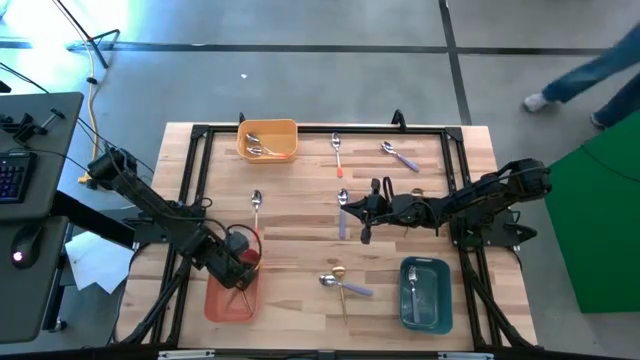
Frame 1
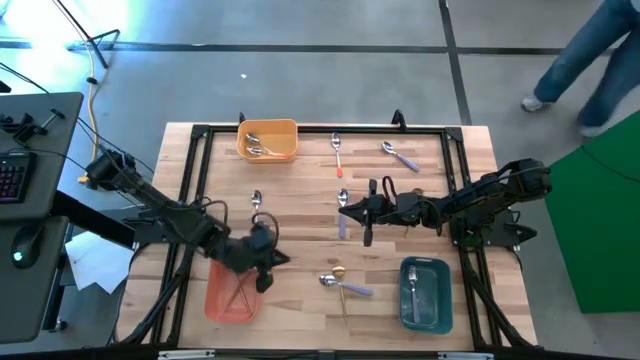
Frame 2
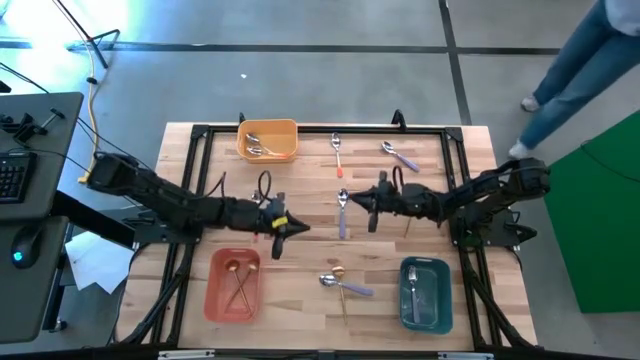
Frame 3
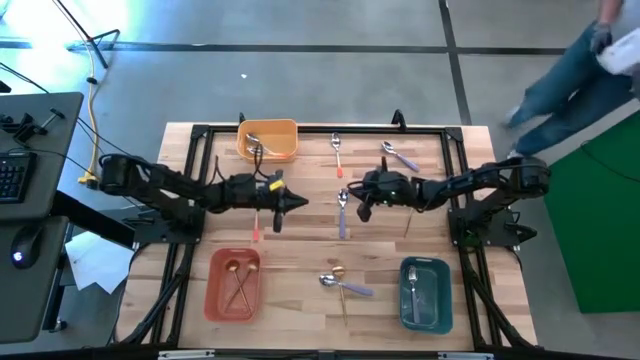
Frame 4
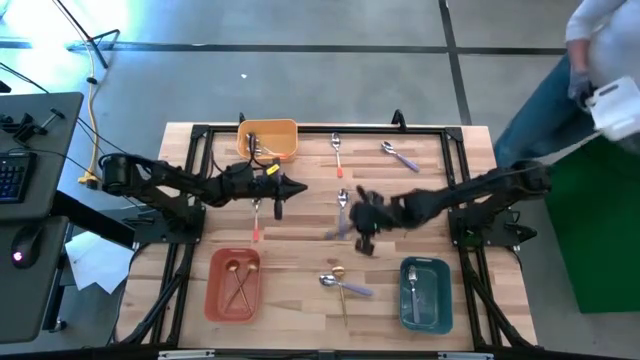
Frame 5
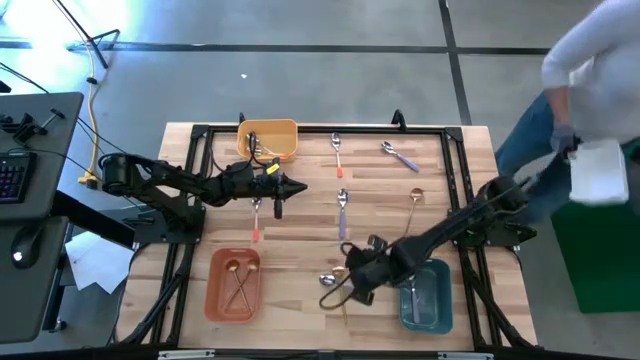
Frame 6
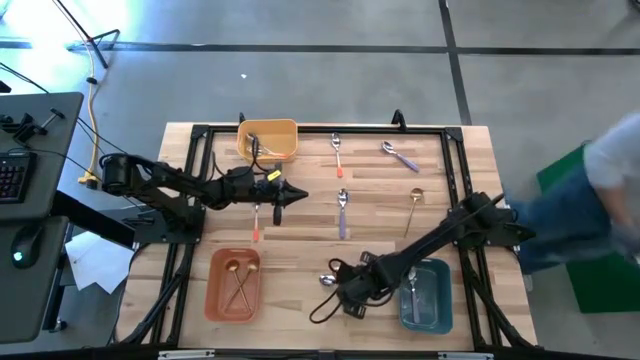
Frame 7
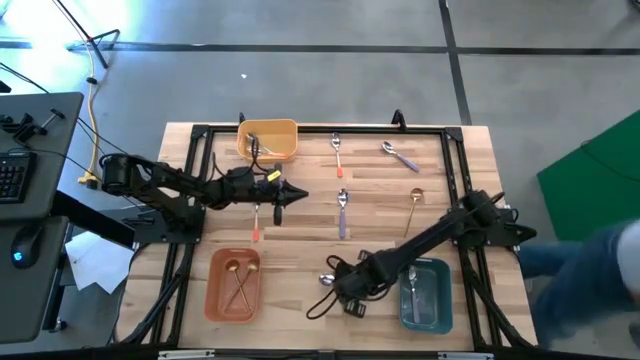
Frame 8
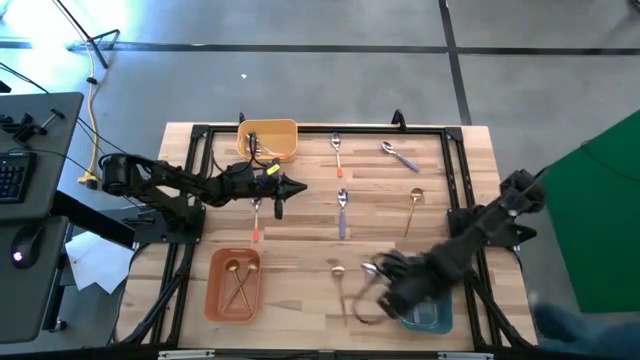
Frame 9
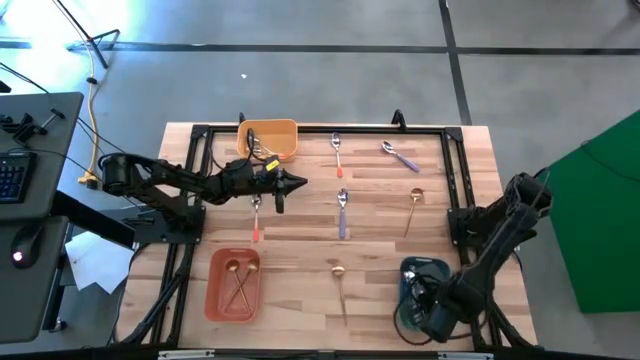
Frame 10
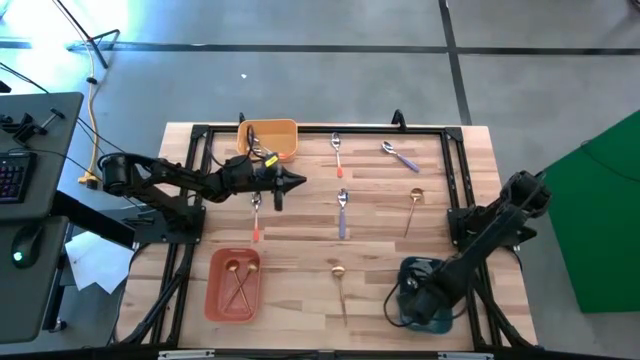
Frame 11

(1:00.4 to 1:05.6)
Task: Sort silverware by color (type)
Put the bottom left violet spoon into the blue bin

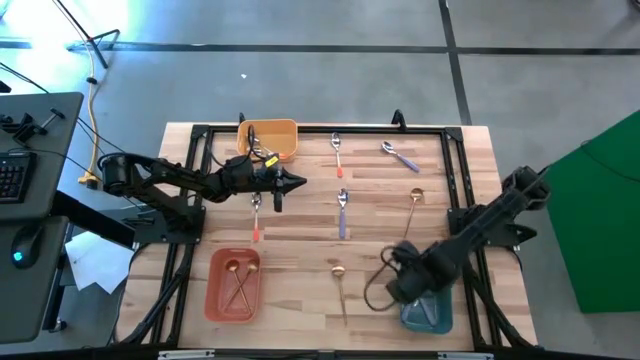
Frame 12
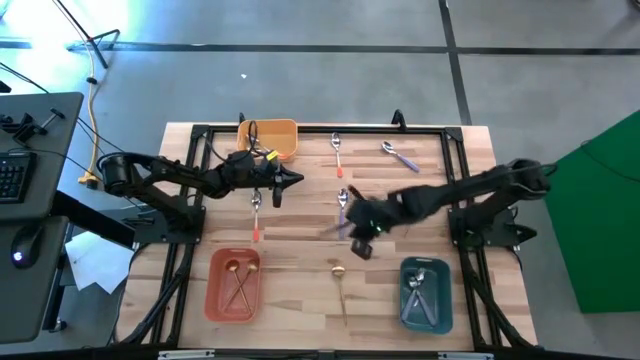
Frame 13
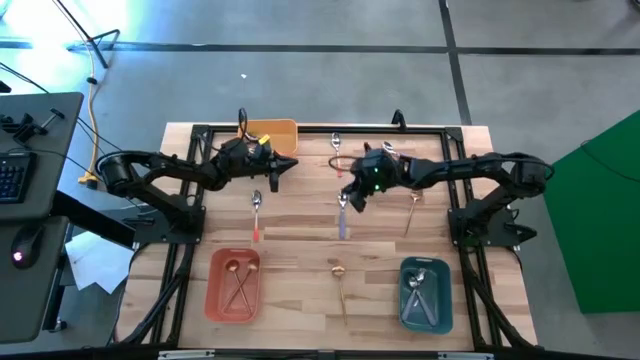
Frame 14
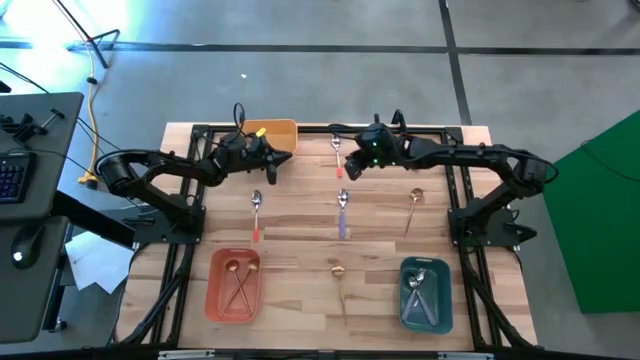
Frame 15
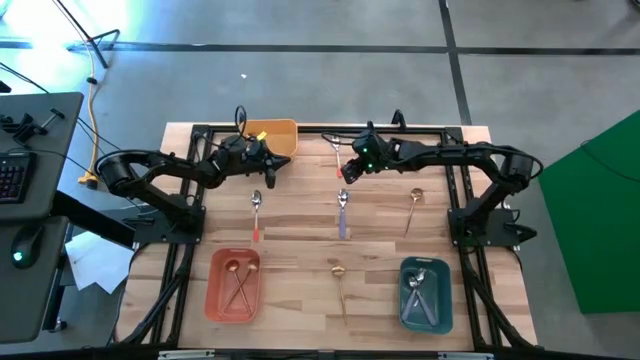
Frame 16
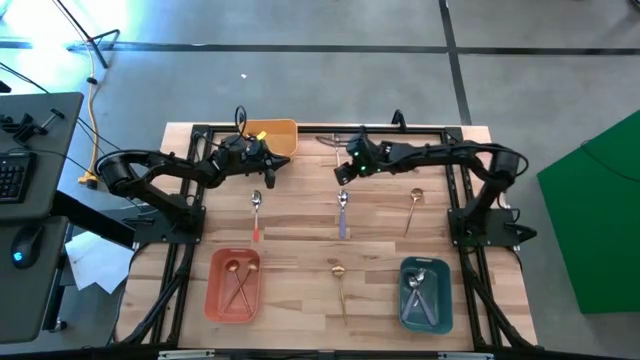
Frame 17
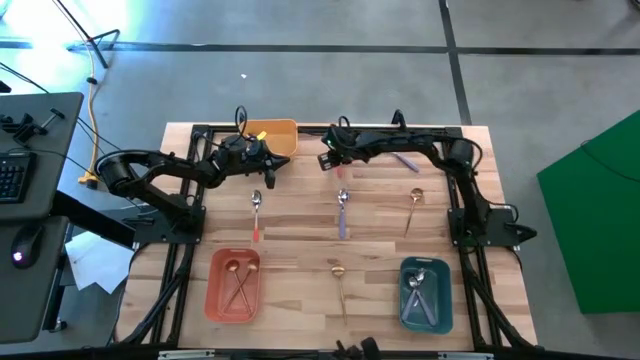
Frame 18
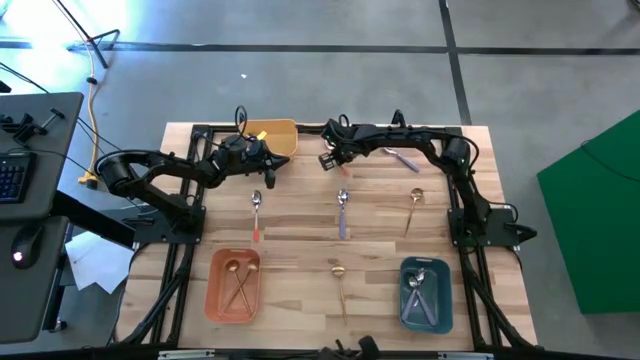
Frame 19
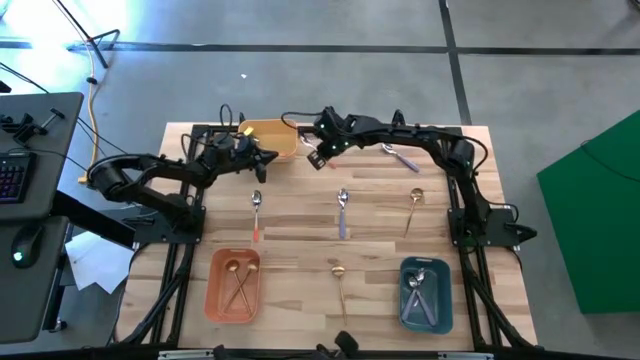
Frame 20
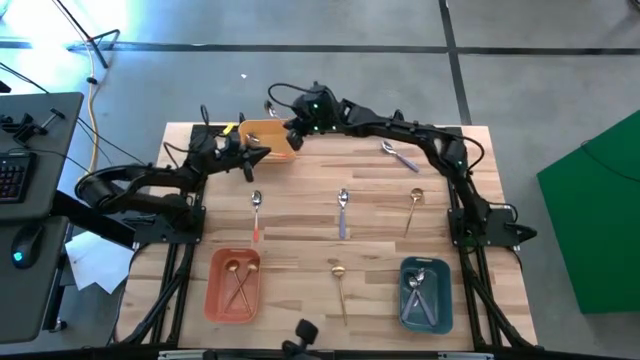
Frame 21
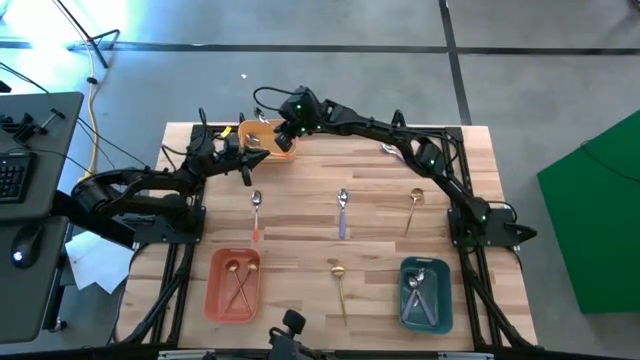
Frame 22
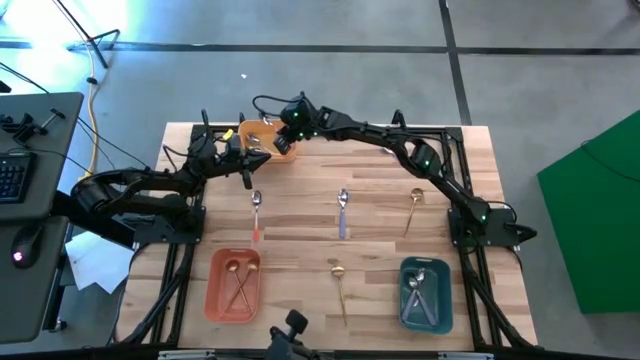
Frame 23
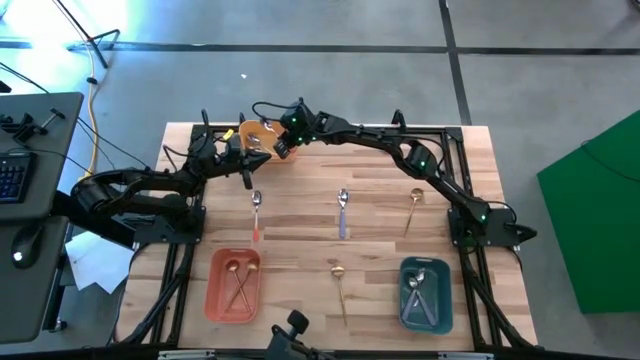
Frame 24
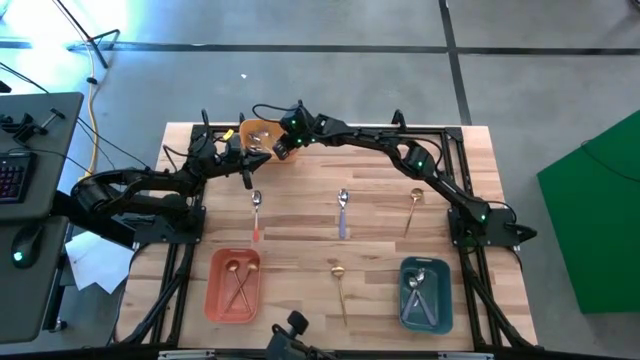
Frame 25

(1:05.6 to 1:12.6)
Put the top orange spoon into the yellow bin

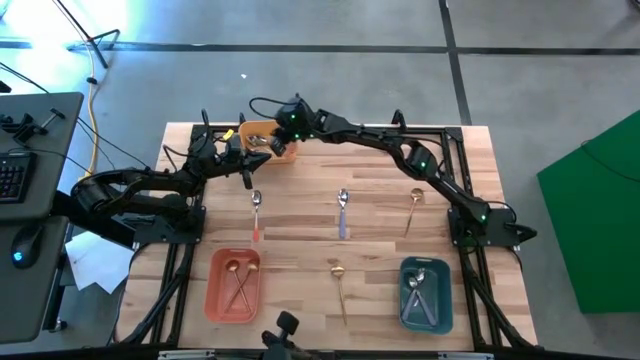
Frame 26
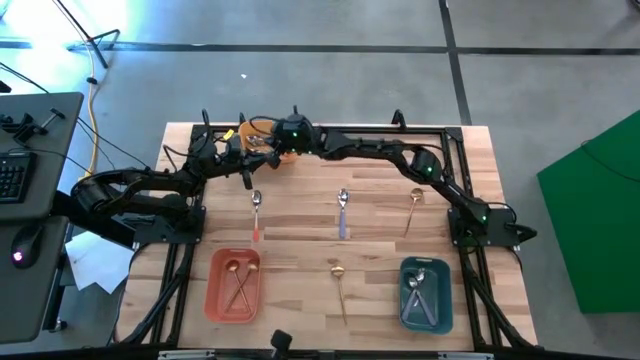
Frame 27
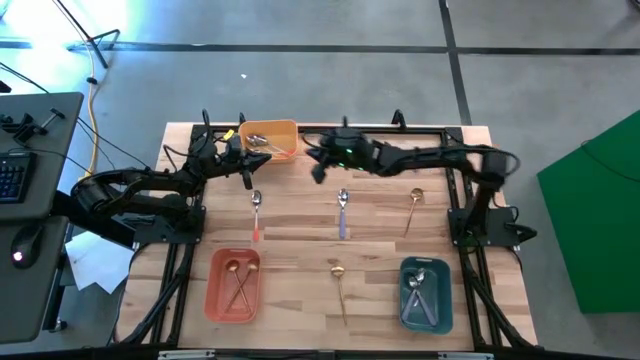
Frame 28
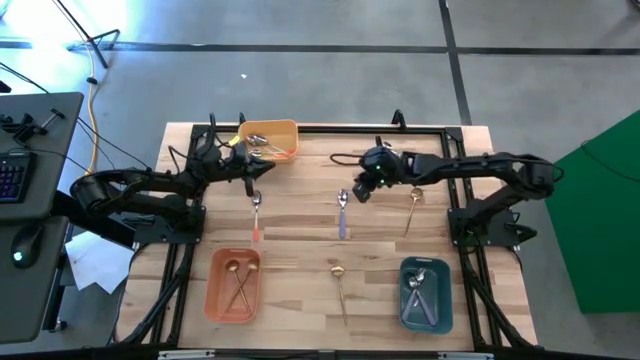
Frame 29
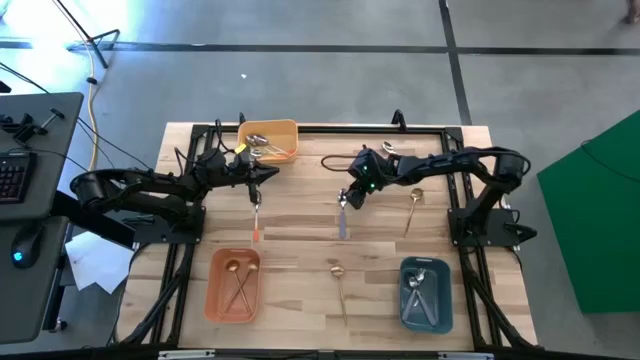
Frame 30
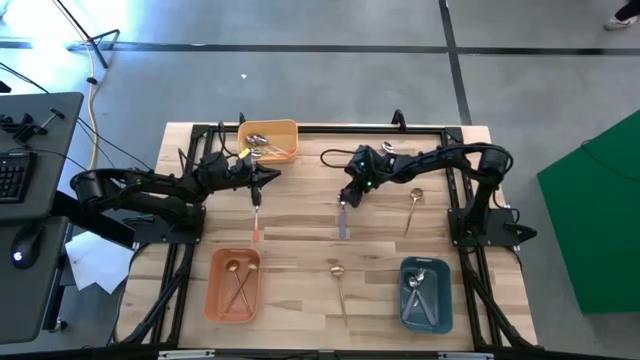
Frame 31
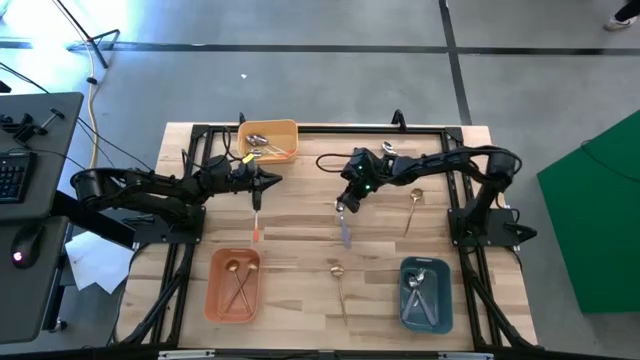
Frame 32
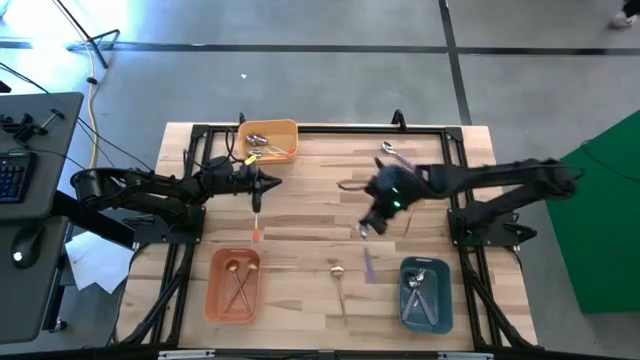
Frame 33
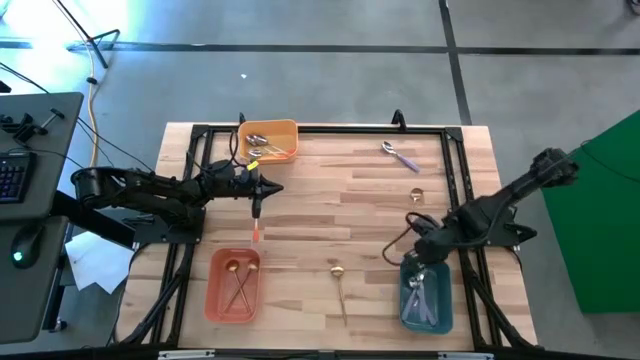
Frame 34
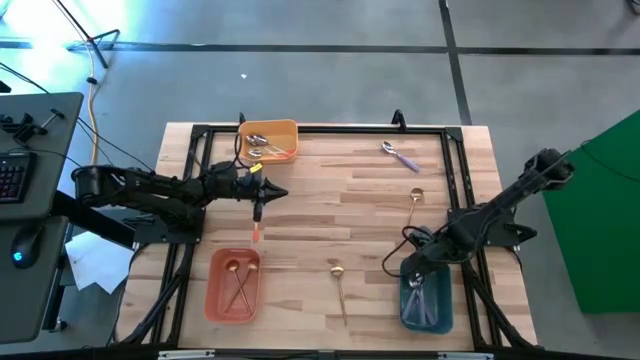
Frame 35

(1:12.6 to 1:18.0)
Put the bottom violet spoon into the blue bin

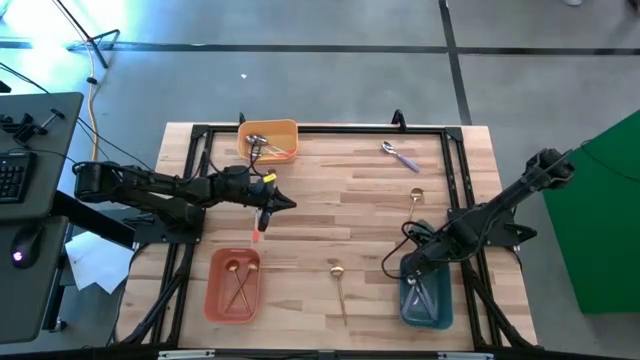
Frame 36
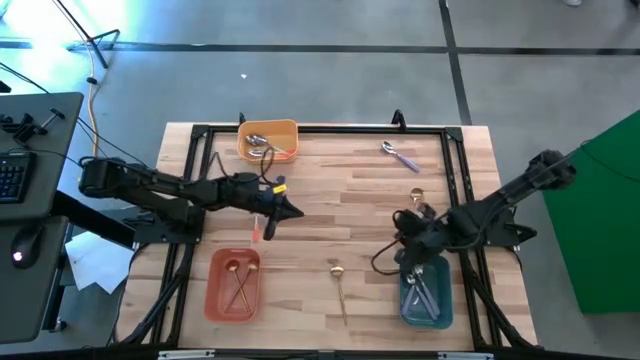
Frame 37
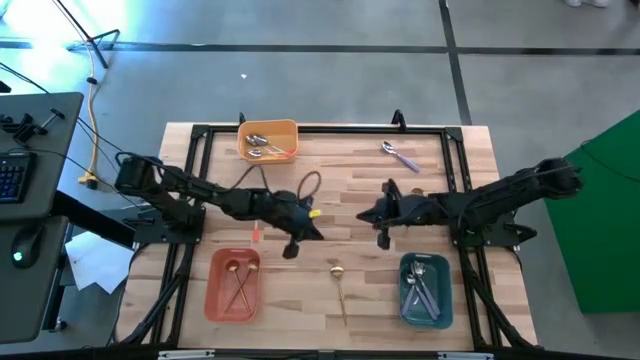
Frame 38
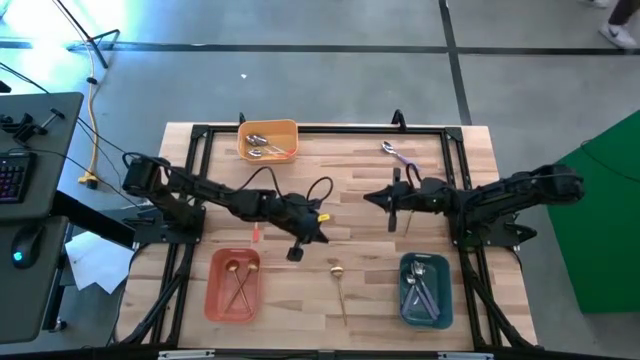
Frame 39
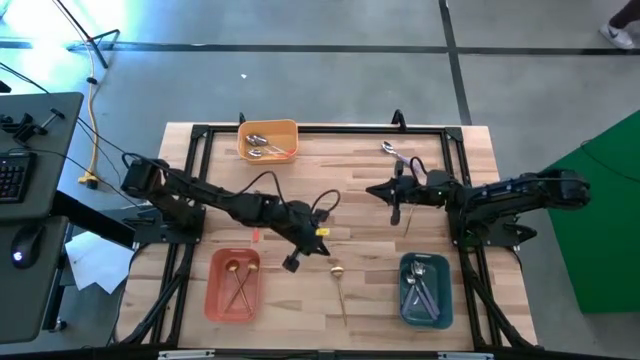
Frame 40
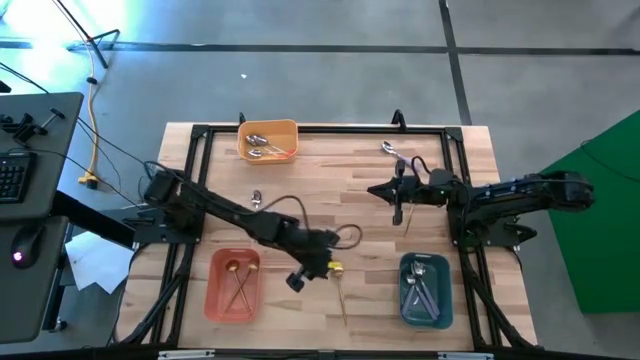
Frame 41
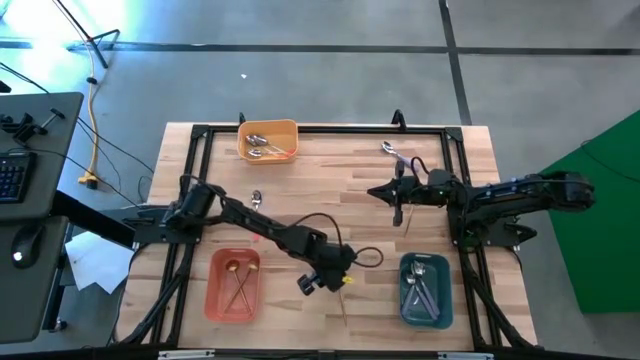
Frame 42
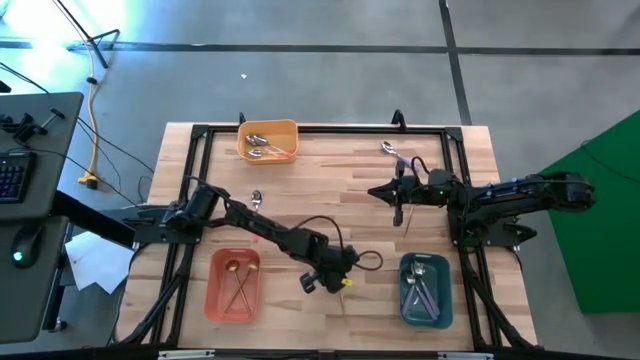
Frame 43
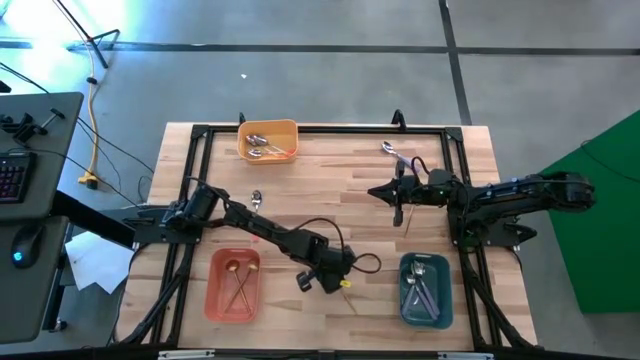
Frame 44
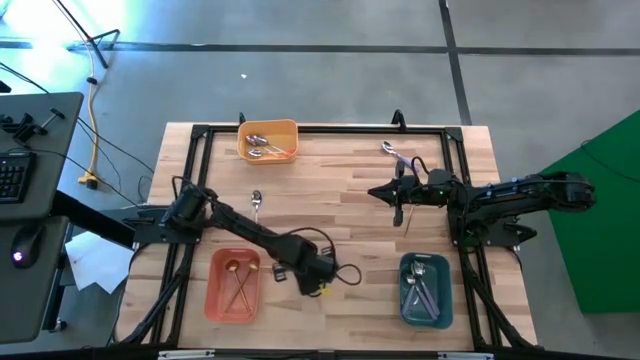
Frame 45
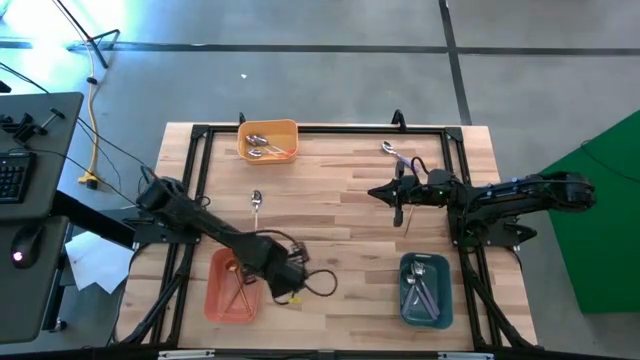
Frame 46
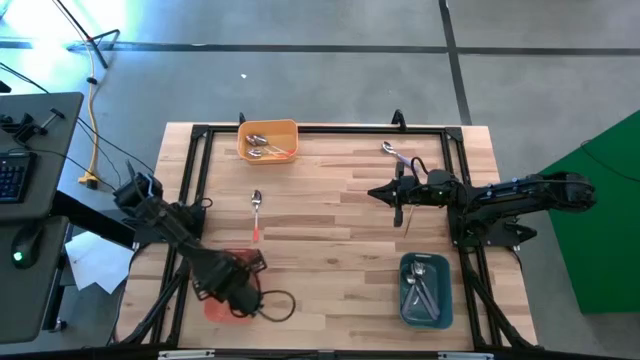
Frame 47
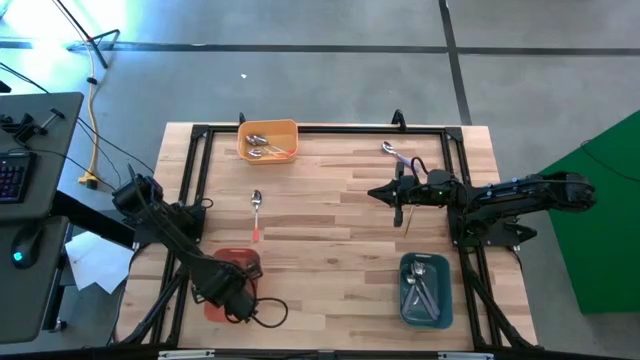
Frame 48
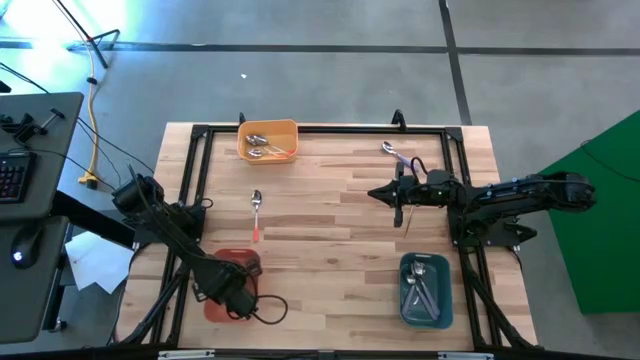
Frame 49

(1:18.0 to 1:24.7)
Put the bottom gold spoon into the orange bin
